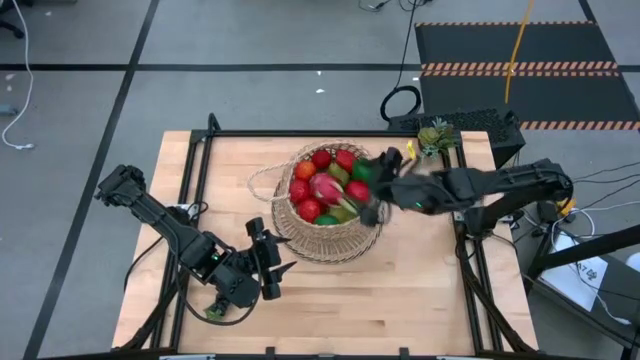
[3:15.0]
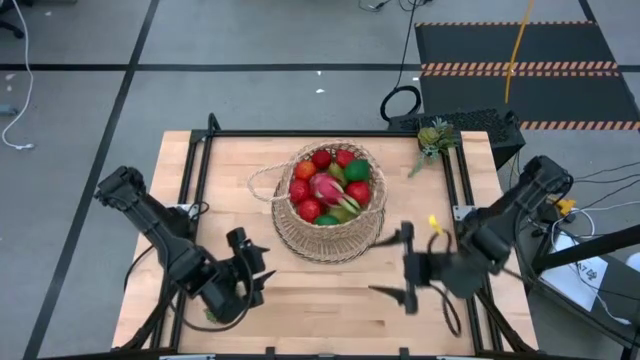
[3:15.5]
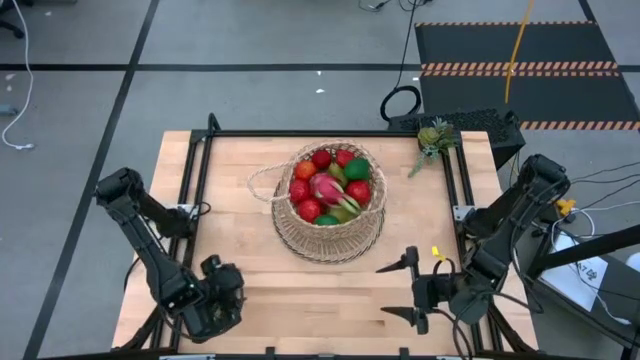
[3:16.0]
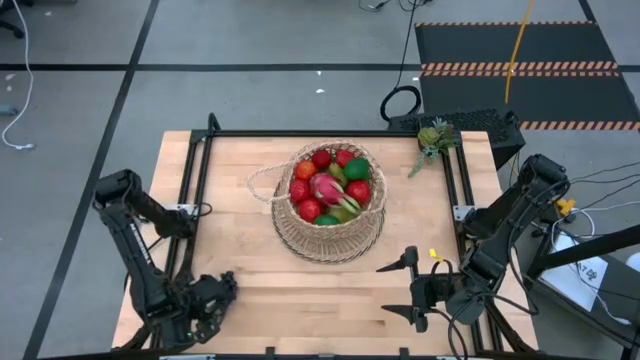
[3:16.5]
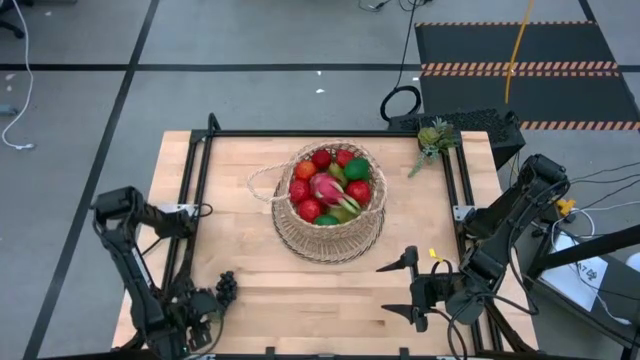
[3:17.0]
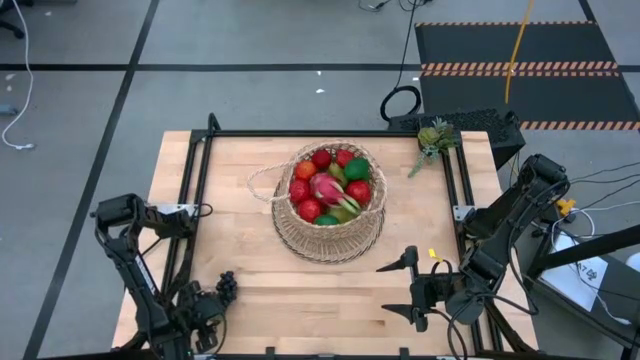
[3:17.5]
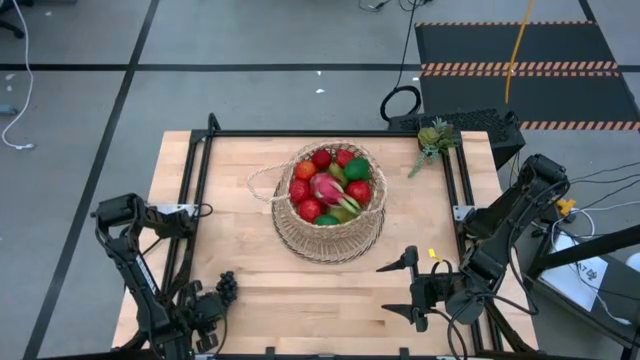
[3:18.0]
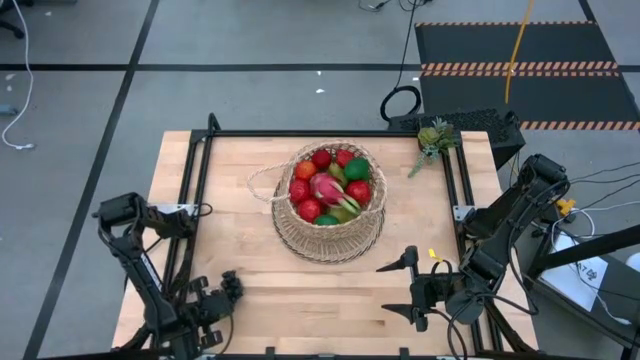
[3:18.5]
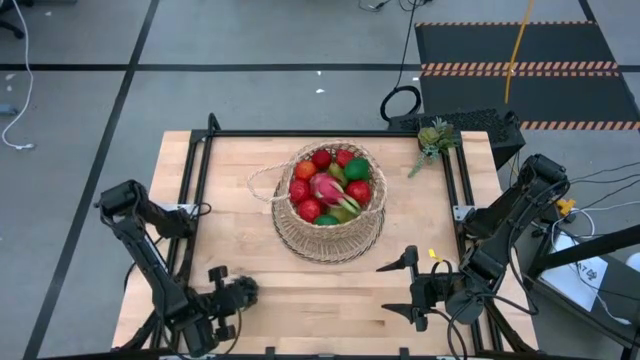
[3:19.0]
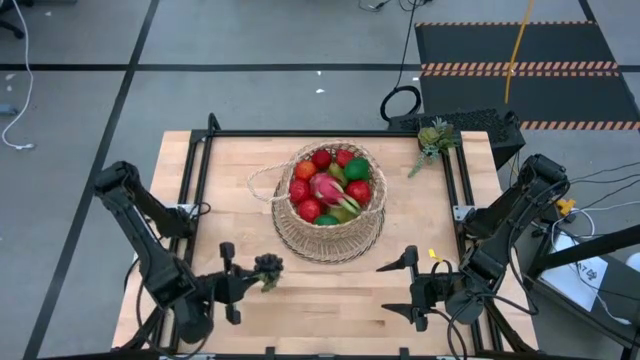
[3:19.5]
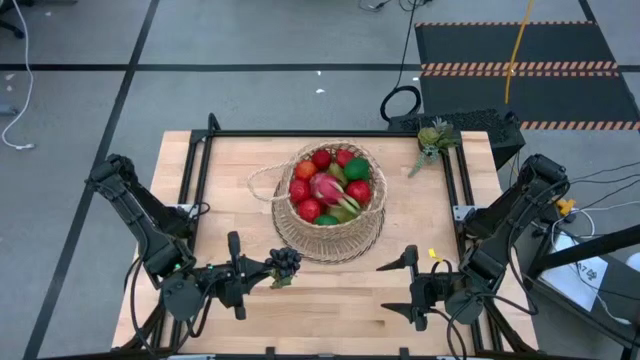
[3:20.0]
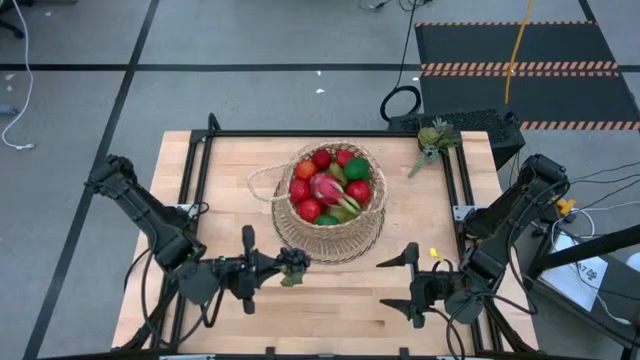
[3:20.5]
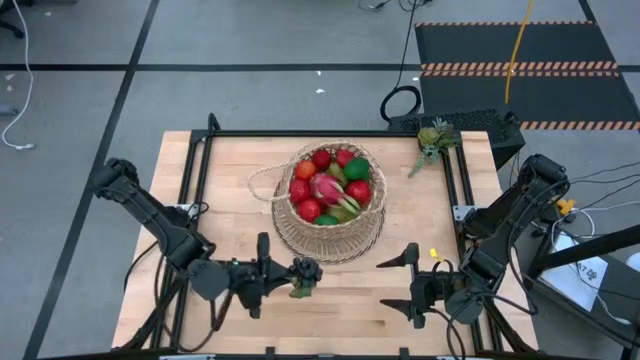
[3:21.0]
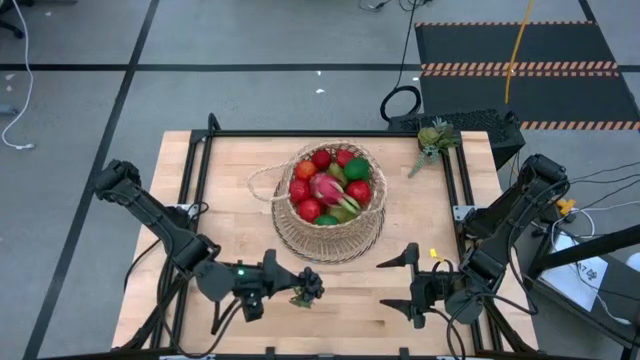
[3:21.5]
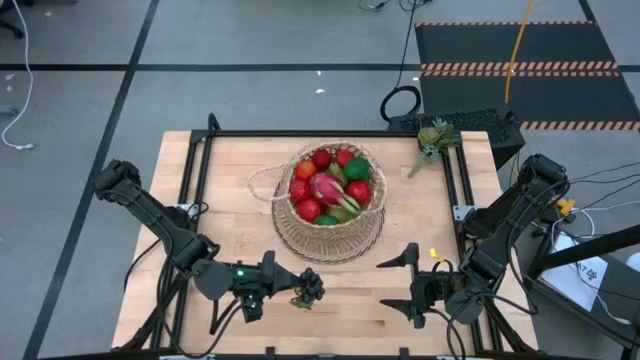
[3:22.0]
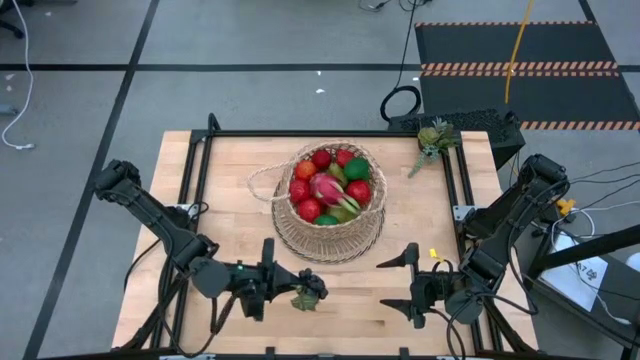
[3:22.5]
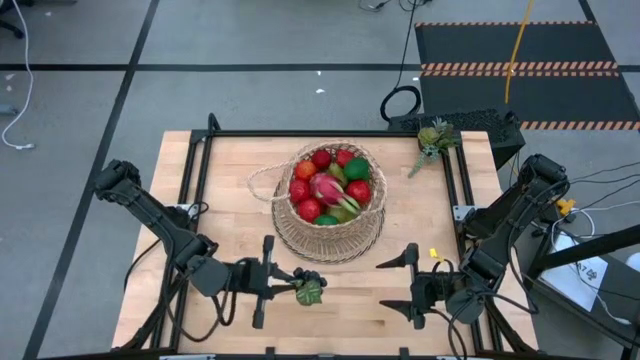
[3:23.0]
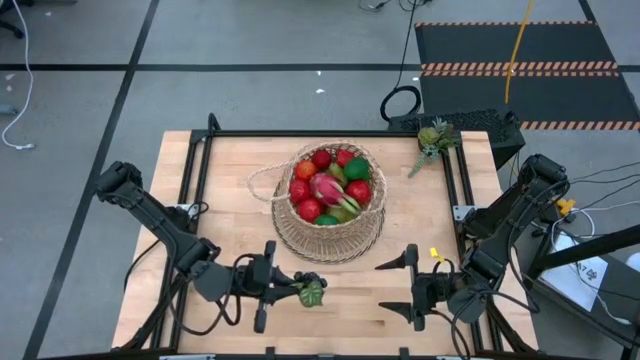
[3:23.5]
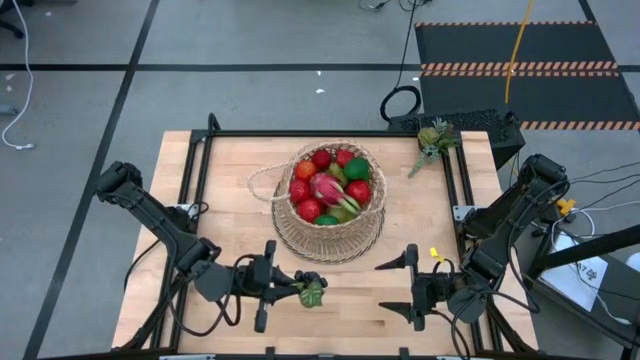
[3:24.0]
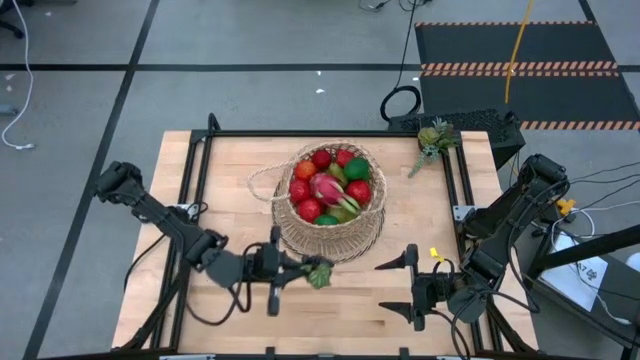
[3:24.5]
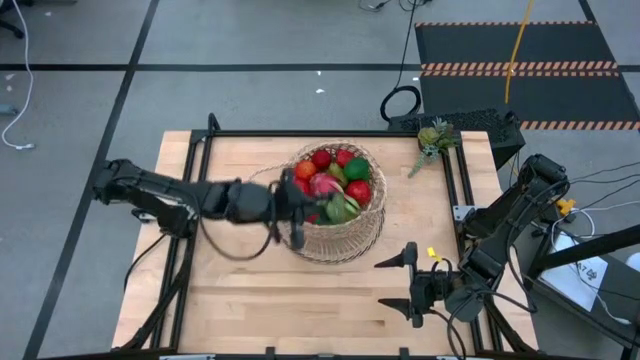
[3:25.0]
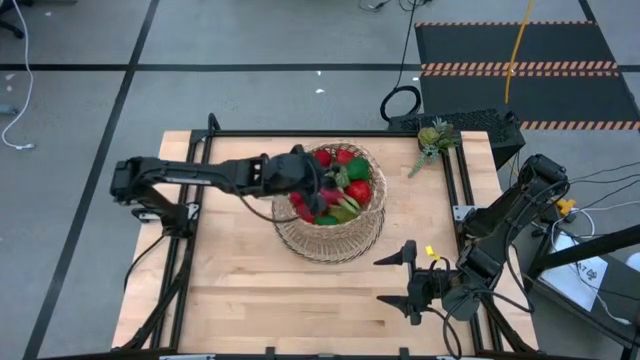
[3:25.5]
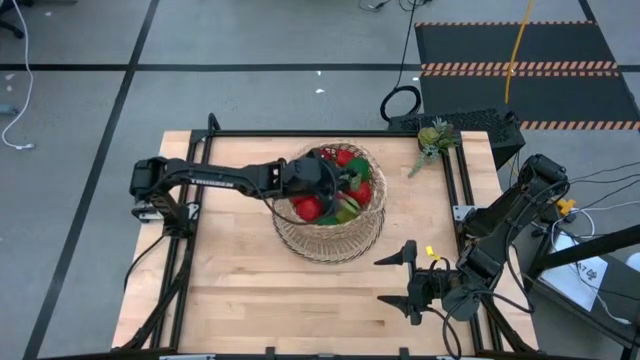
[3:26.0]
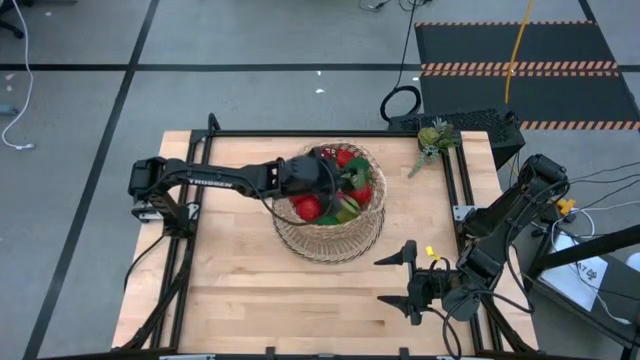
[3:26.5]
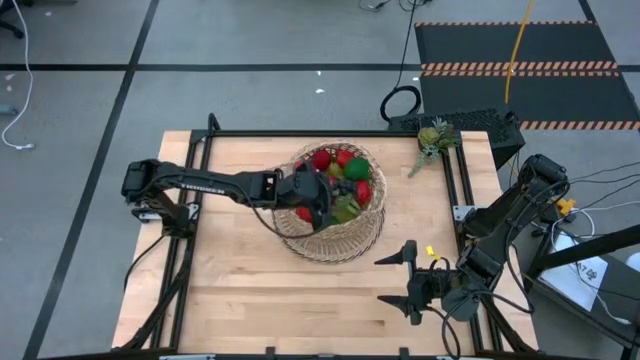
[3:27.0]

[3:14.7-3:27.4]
Task: Build produce basket
Put the grapes into the basket

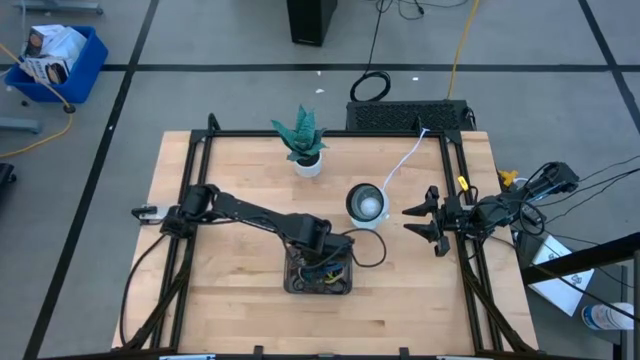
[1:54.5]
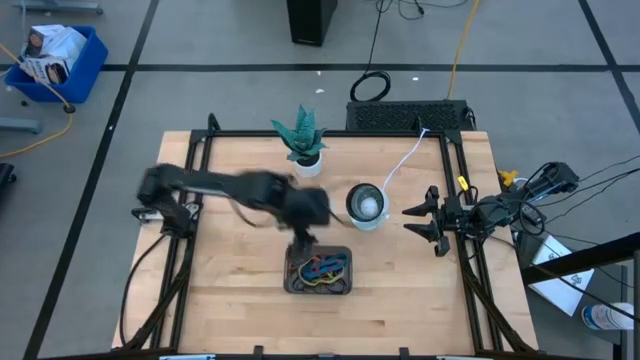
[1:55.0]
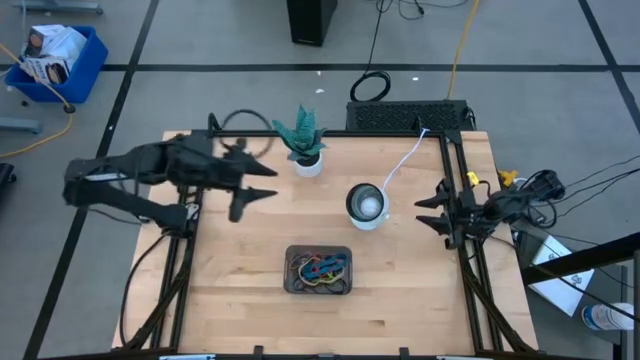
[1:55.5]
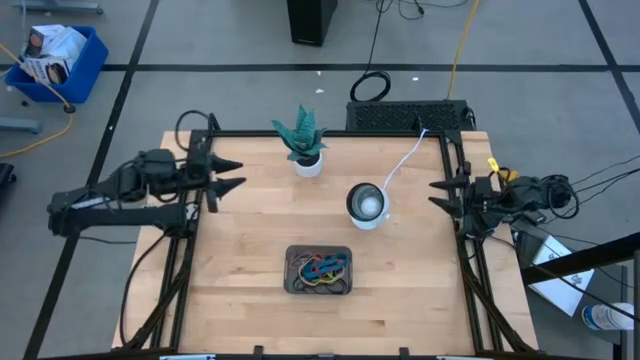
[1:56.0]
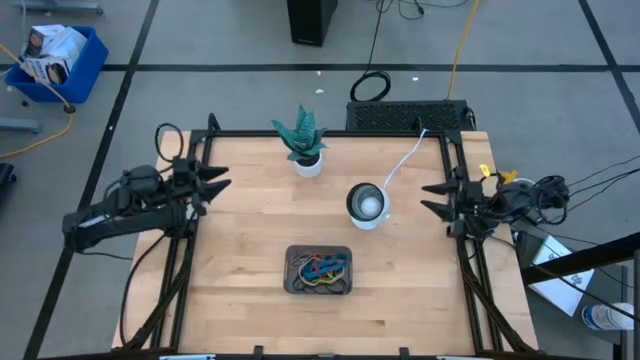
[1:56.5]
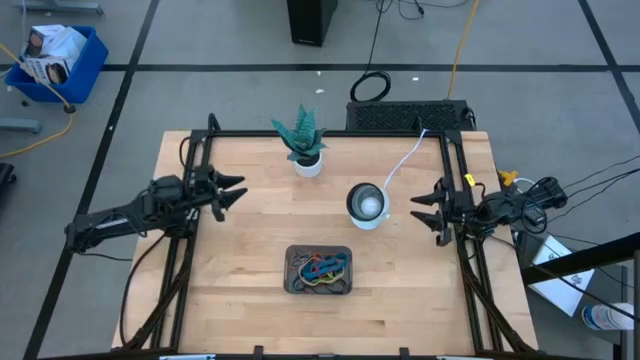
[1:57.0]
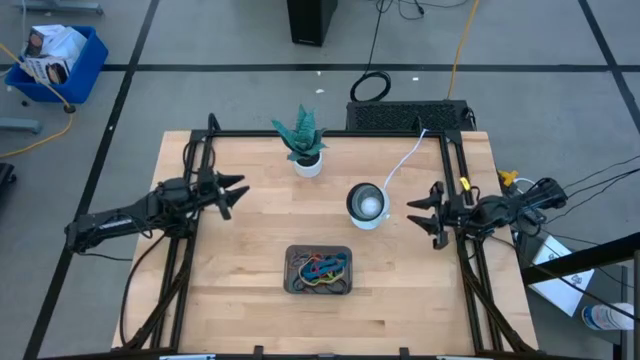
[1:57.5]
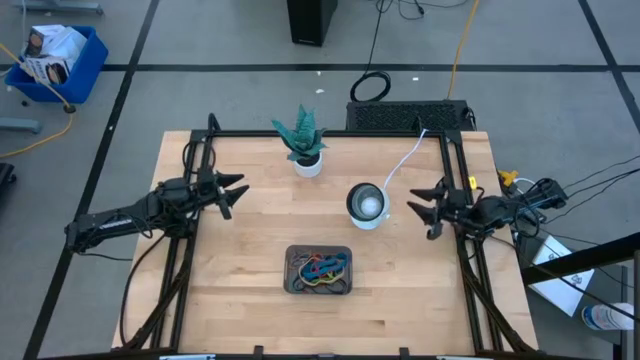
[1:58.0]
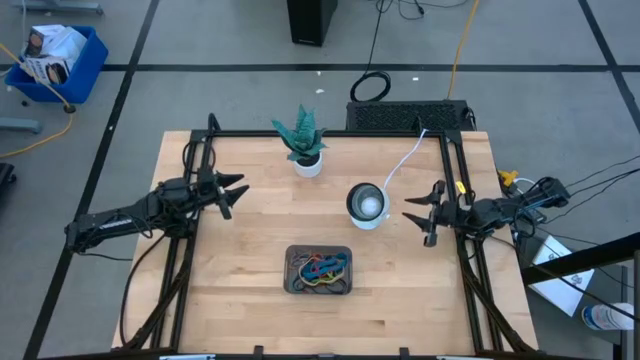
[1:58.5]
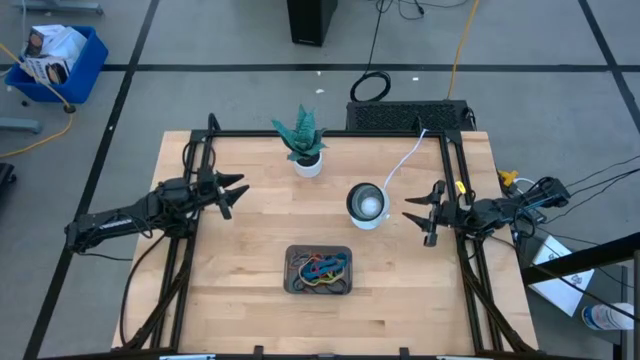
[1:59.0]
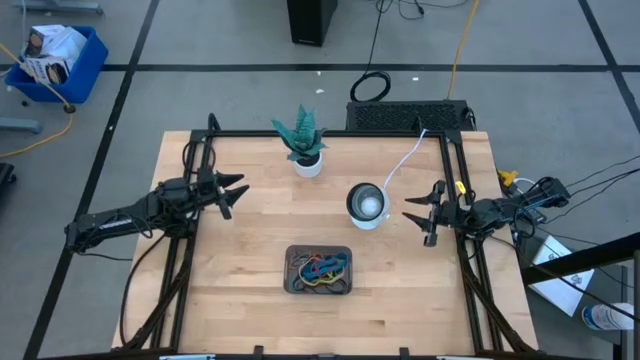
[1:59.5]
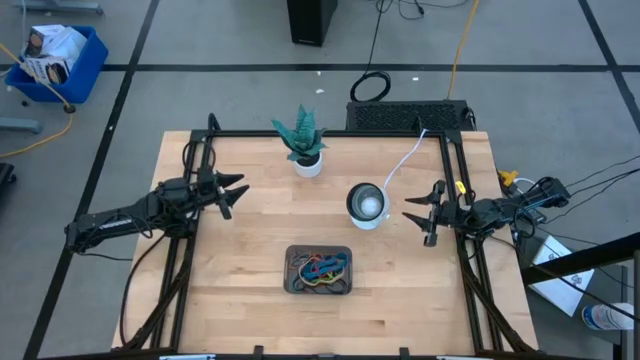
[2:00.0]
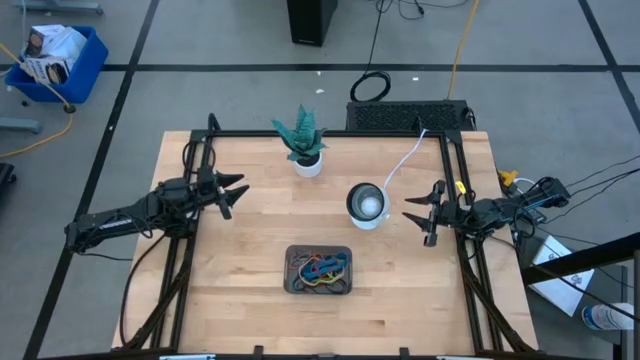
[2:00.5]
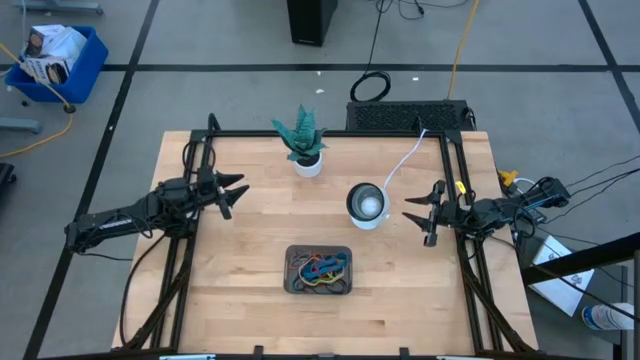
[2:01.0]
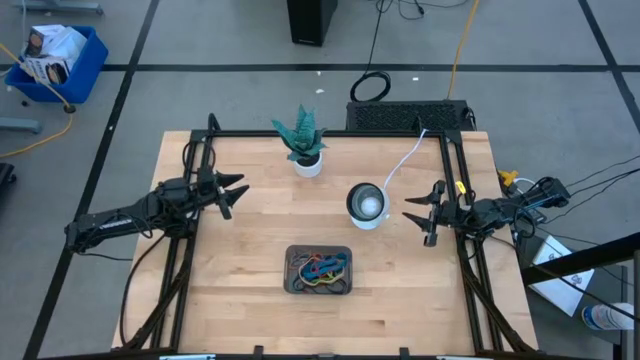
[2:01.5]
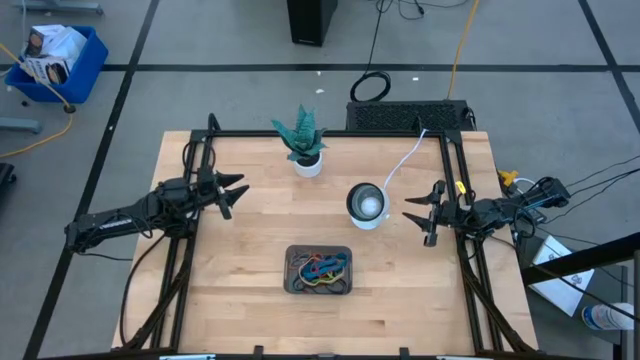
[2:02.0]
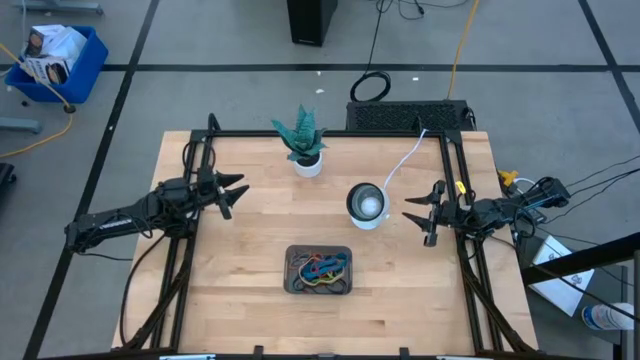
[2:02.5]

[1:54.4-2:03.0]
Task: Pick and place rubber bands into bin
Return to Home Position
